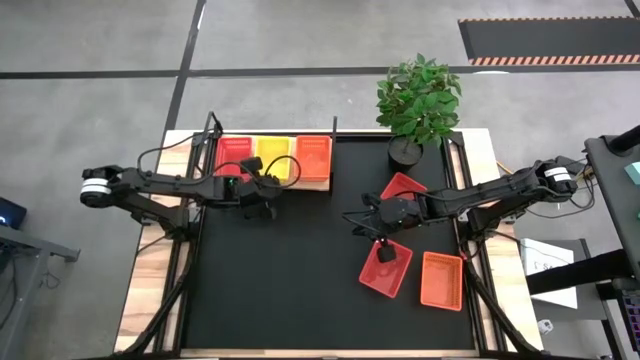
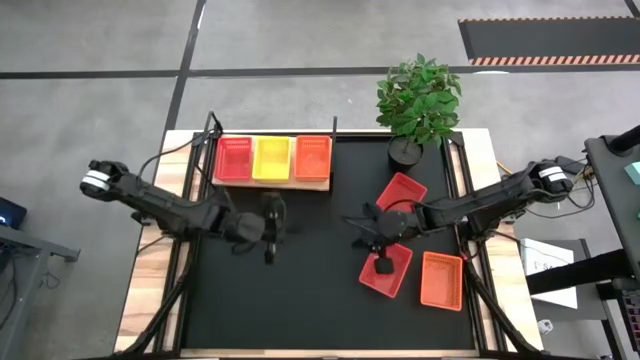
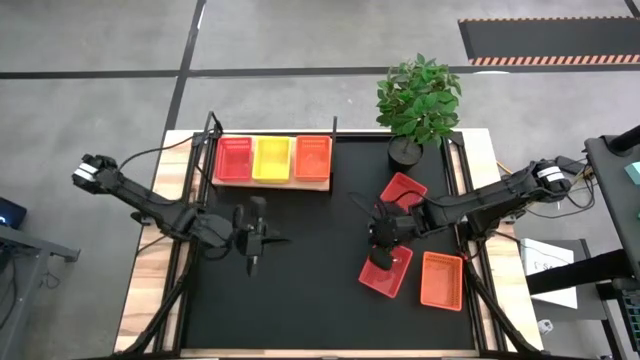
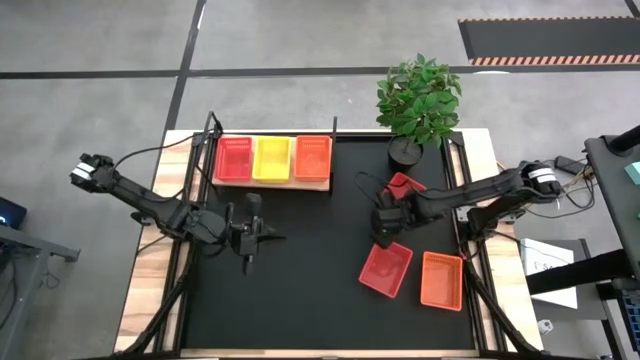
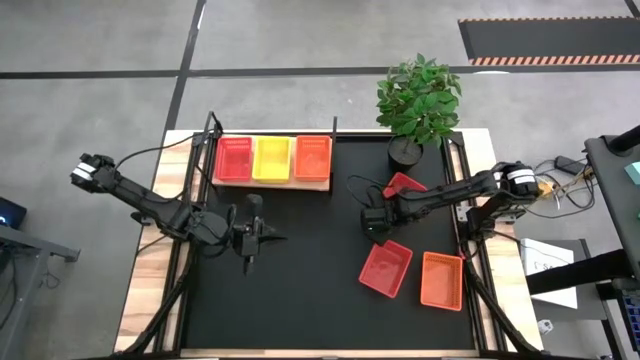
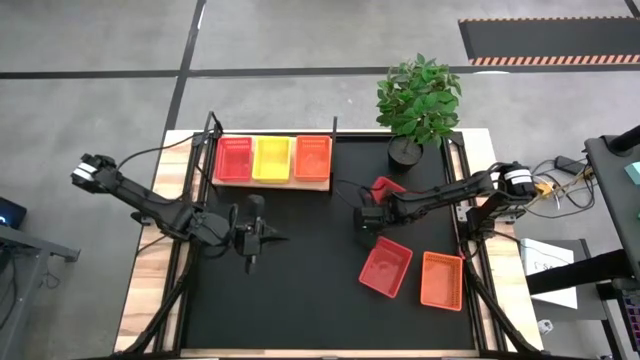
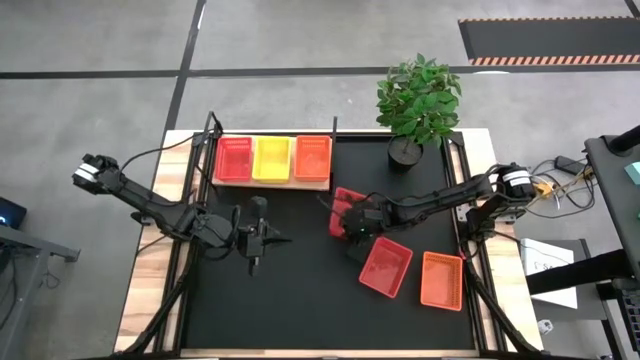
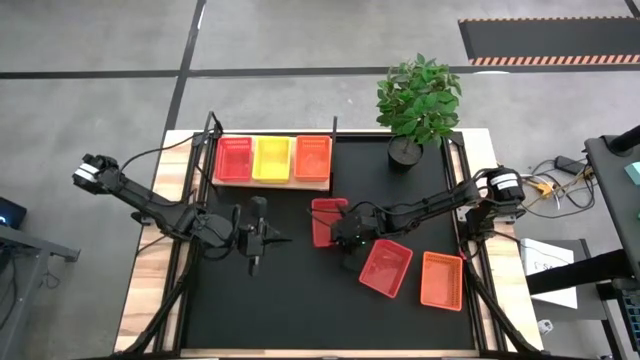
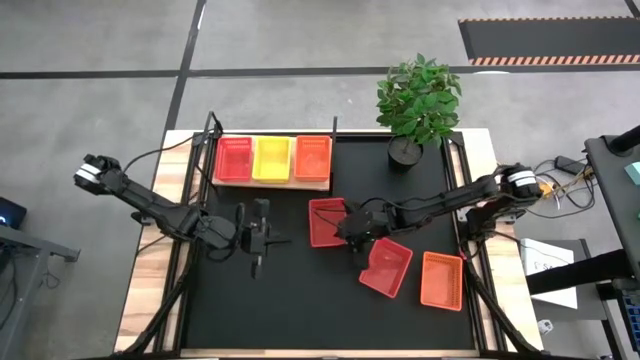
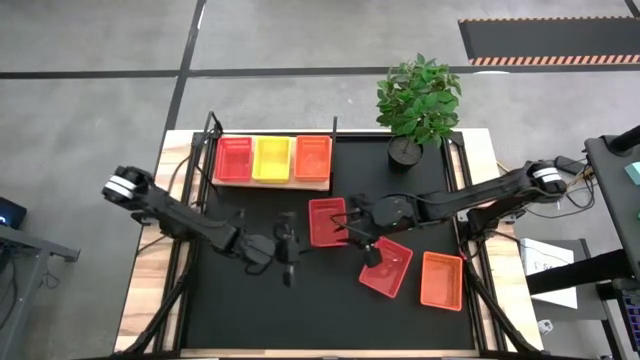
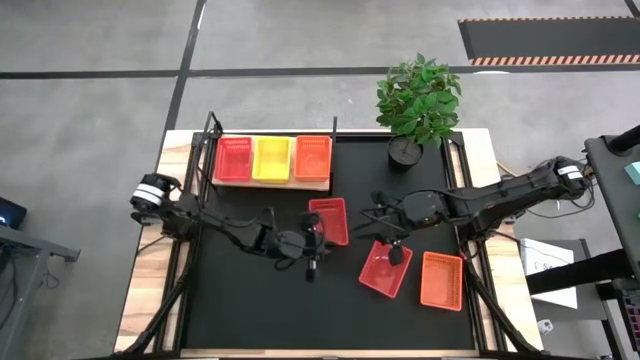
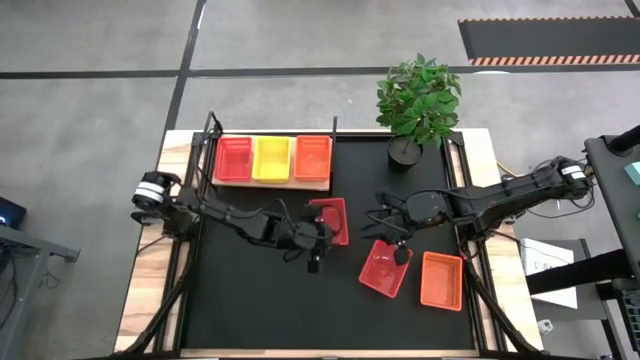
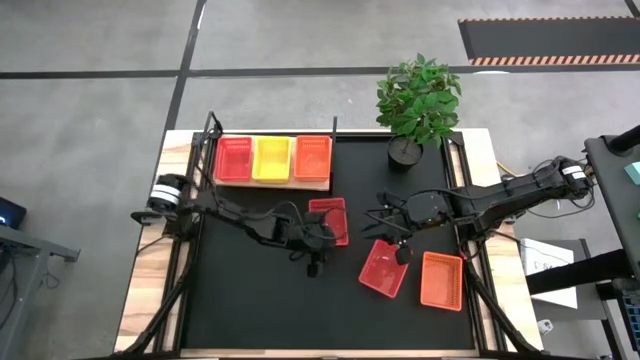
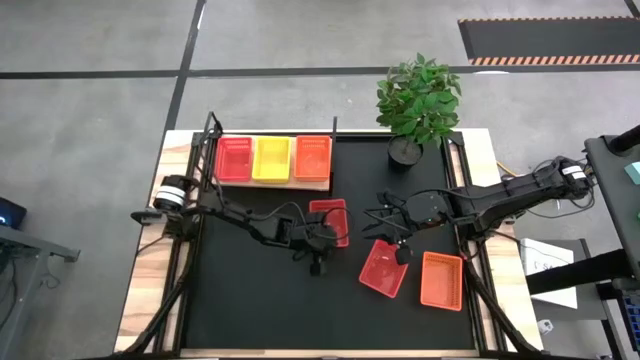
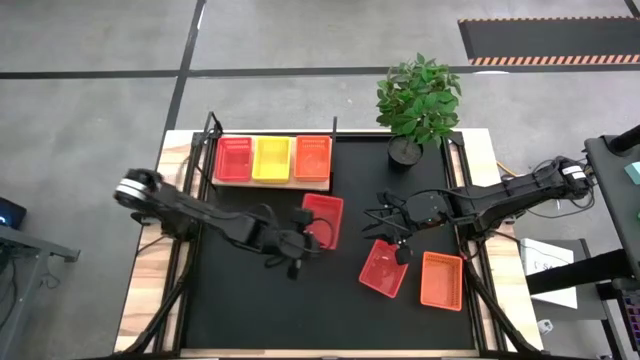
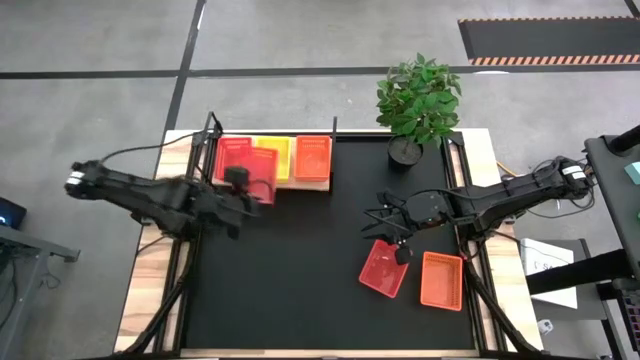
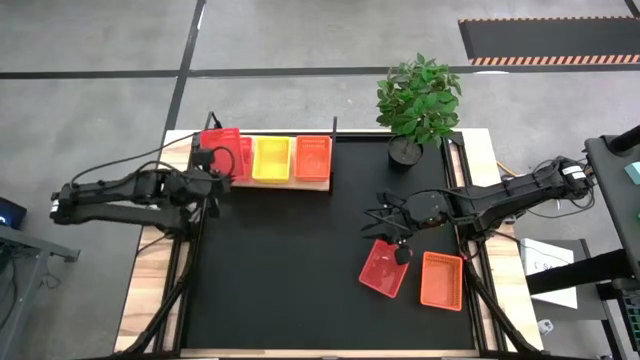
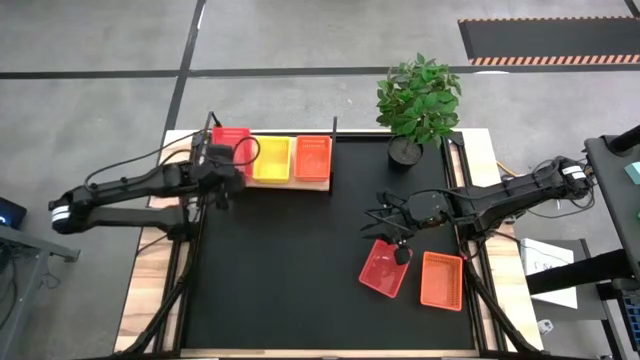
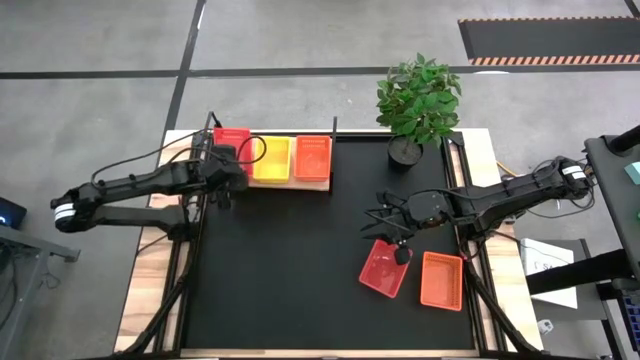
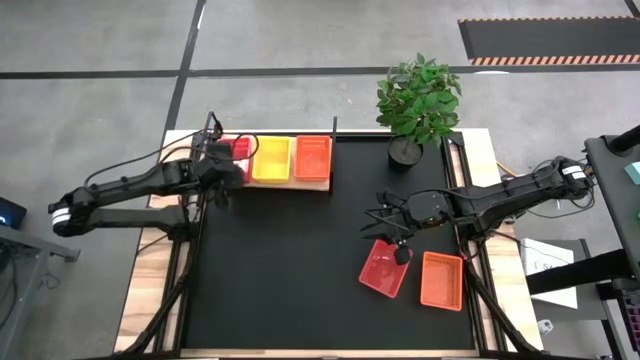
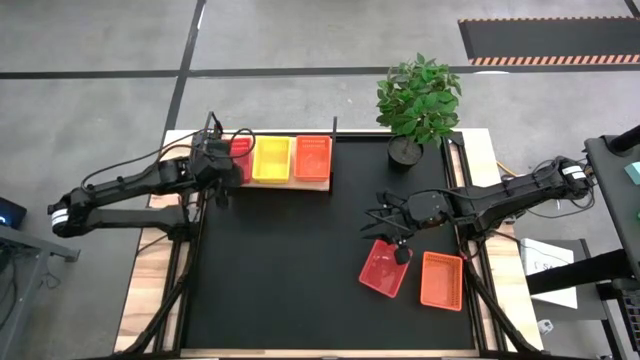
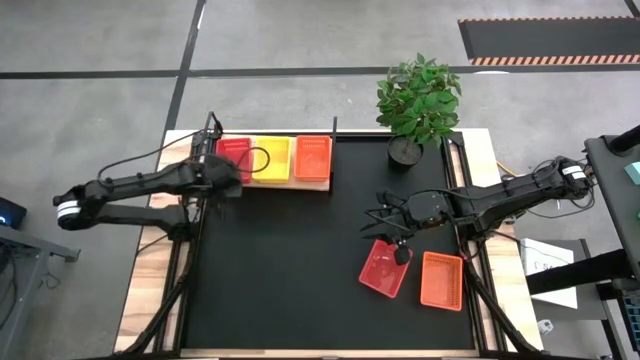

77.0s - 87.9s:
Task: Stack baskets on shelf by color
Stack the top red bin on top of the other red bin on the shelf

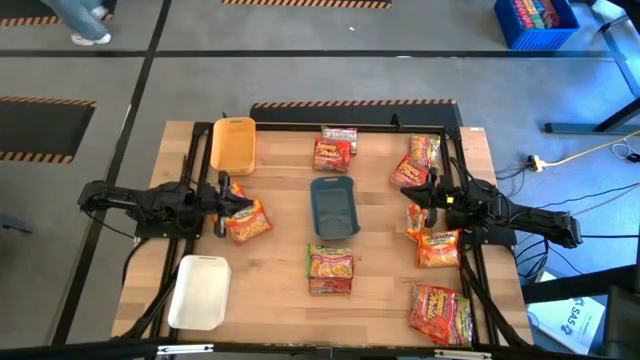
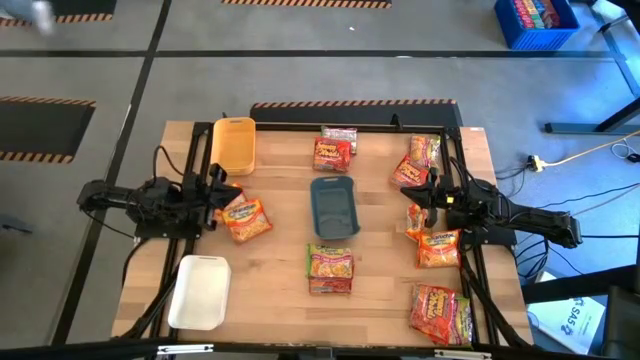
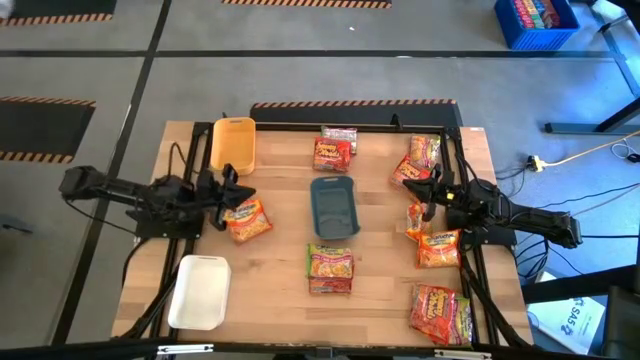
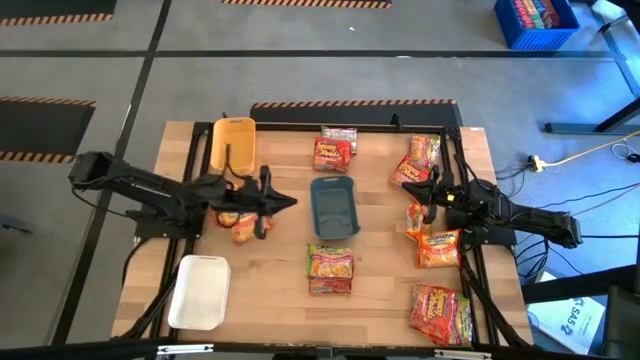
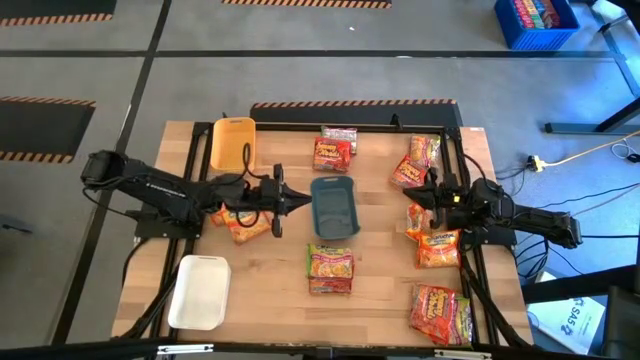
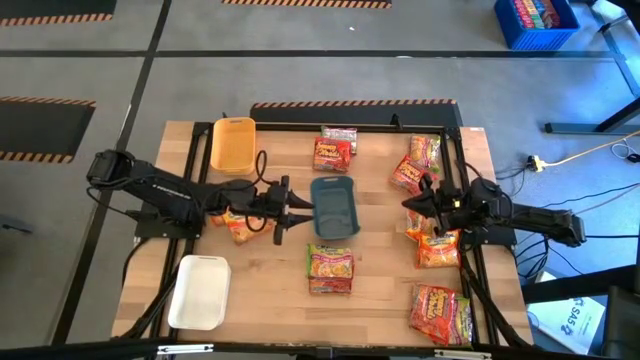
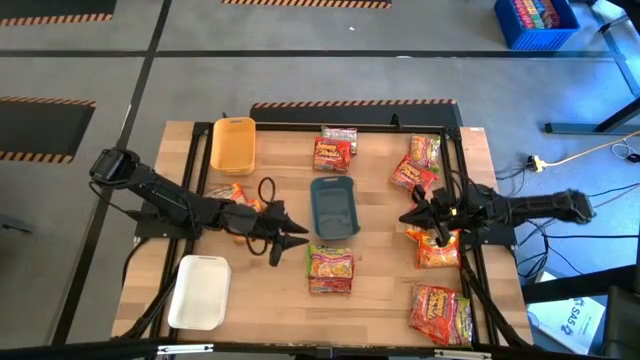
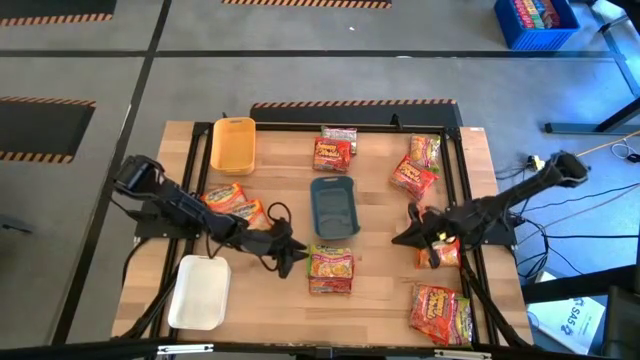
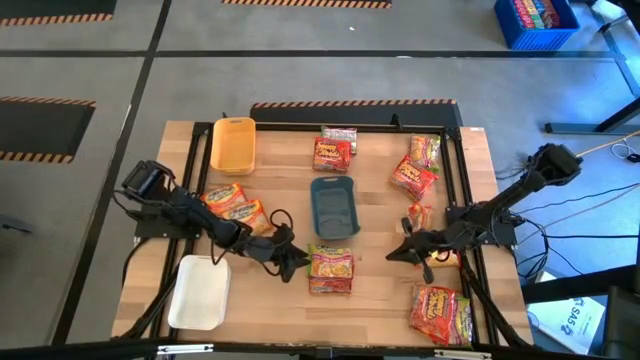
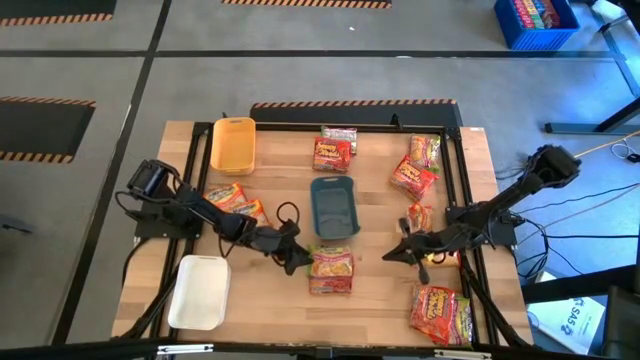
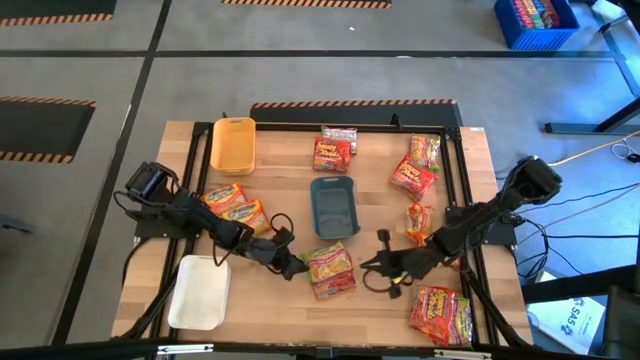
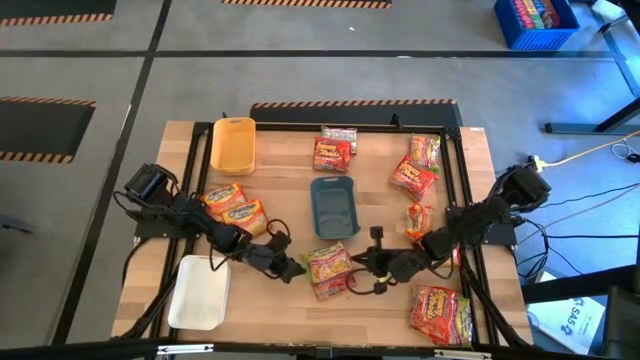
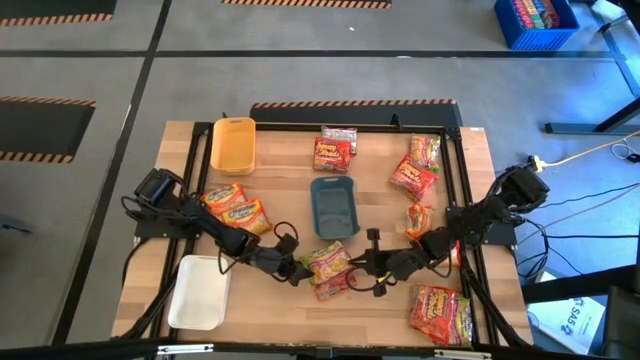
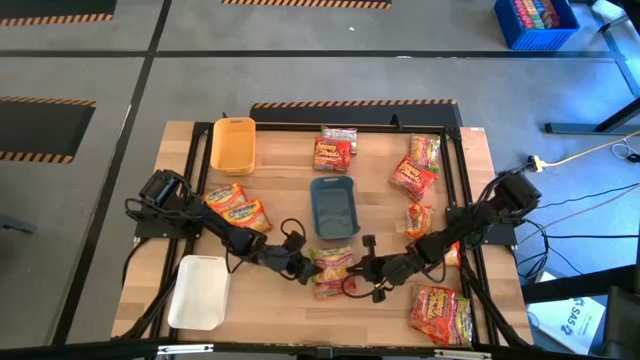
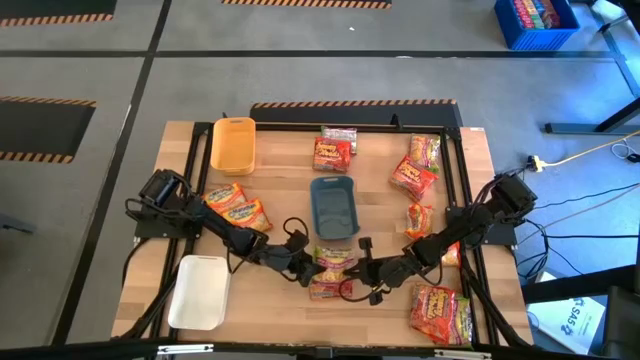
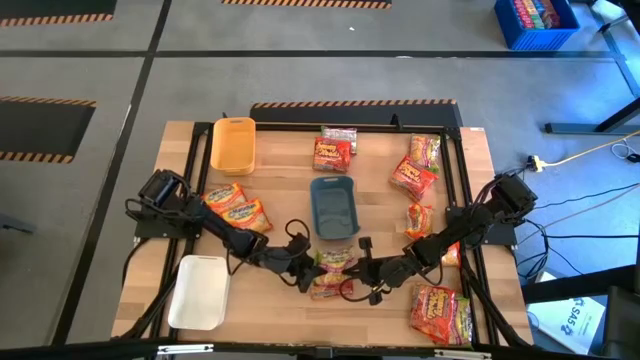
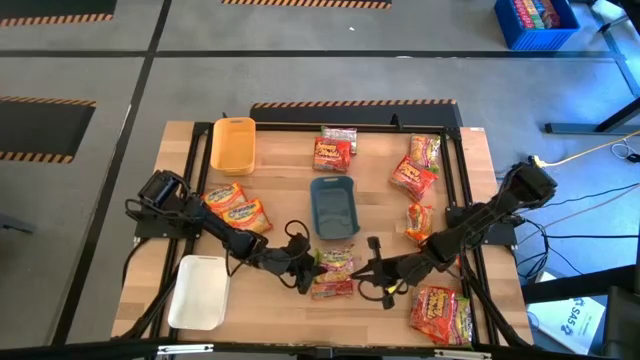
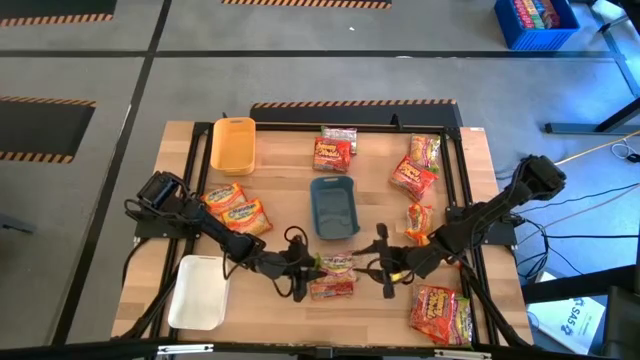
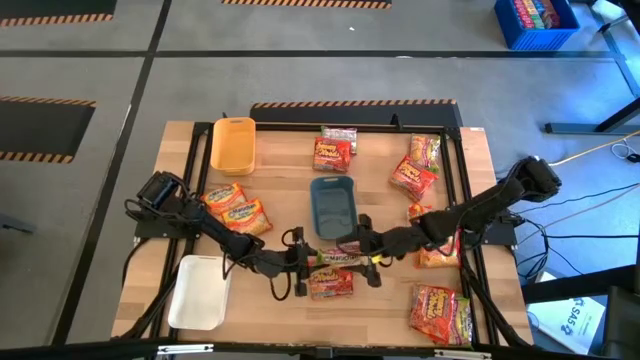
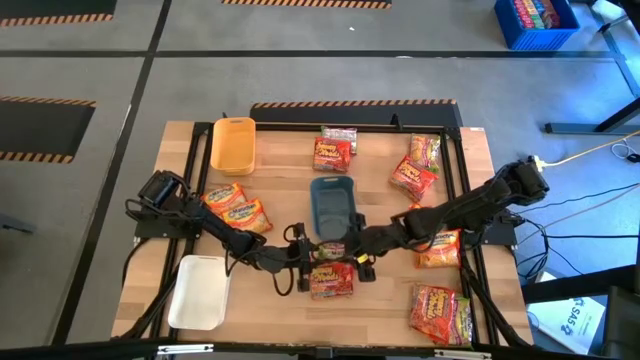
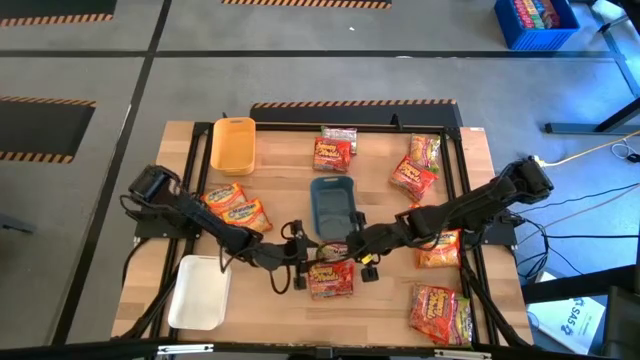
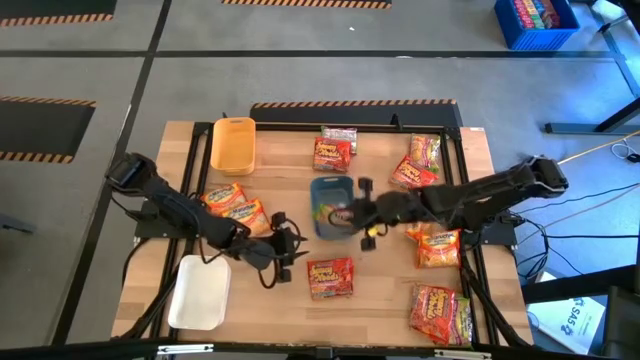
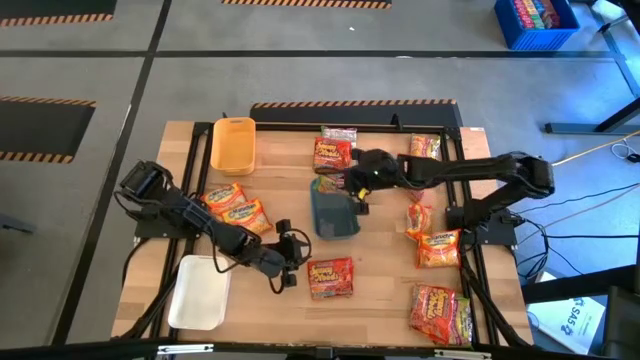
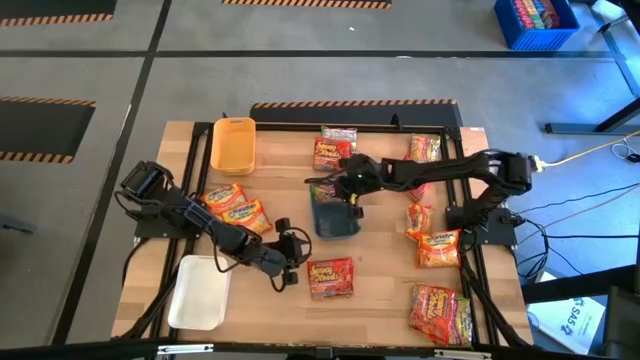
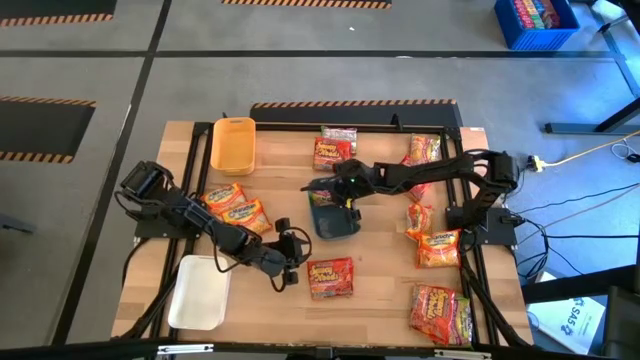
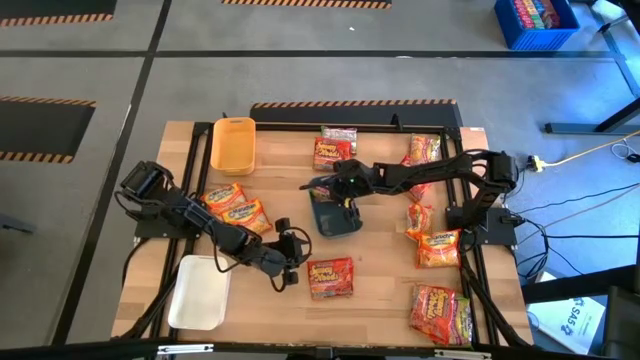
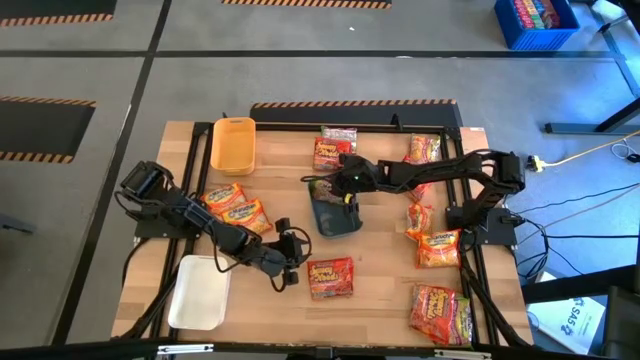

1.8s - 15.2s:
Task: Sort Maruchan noodles
Put the green noodle pack into the blue bin
